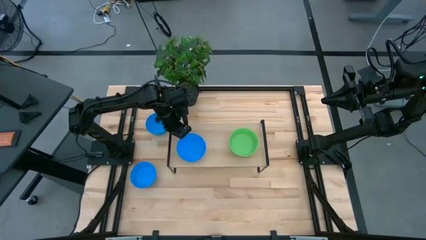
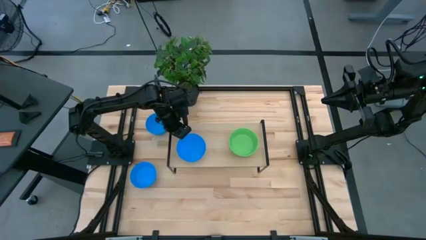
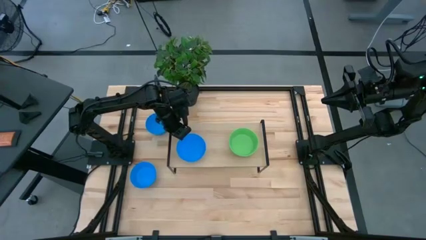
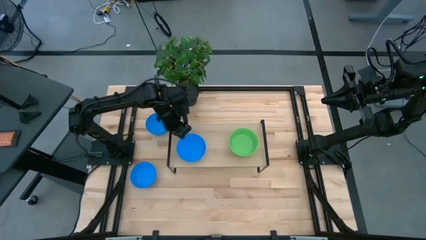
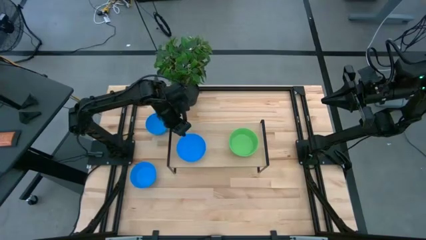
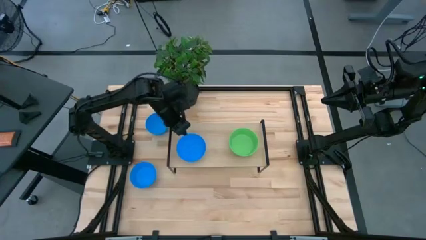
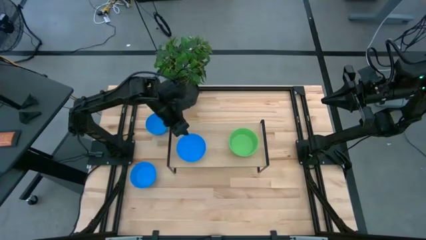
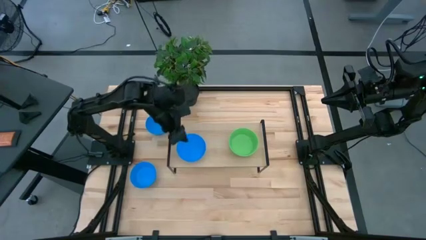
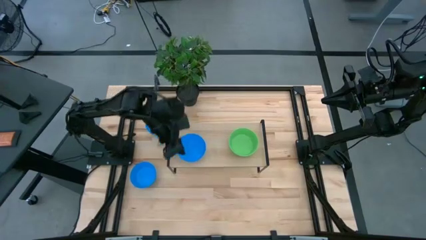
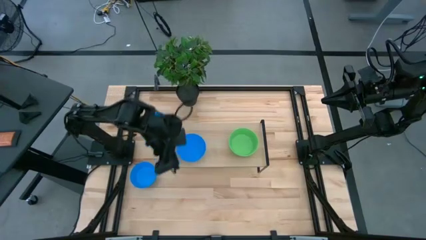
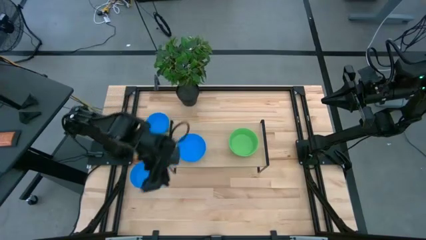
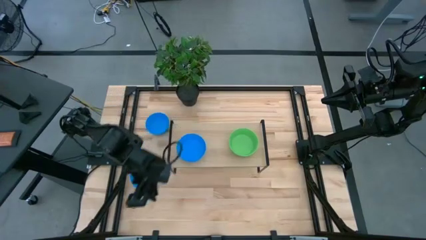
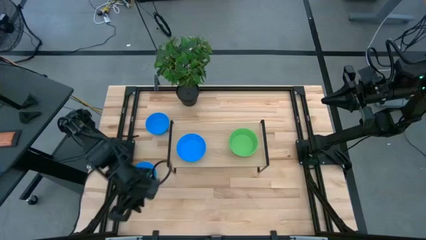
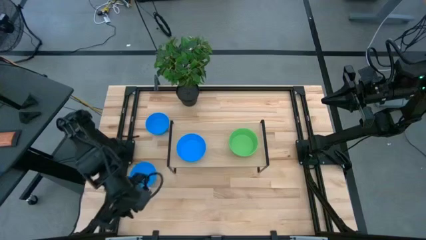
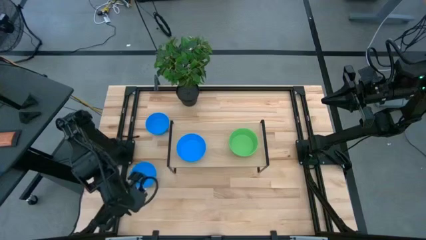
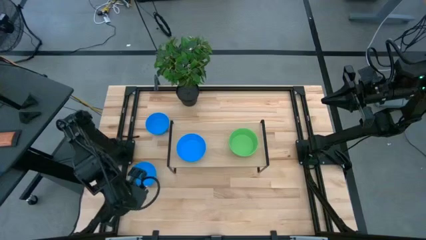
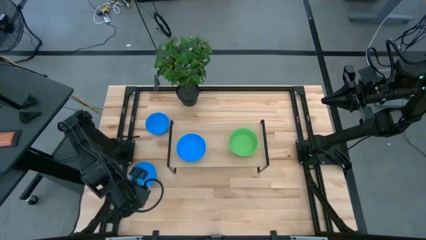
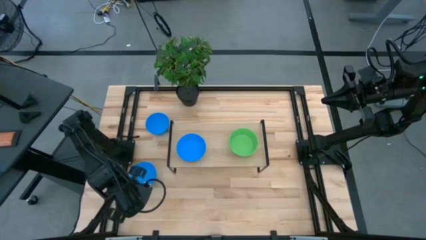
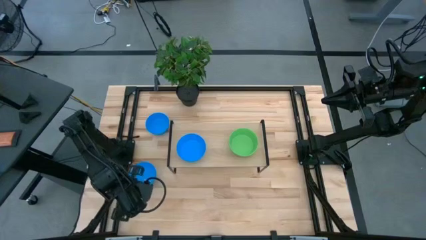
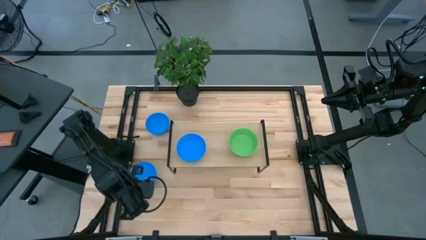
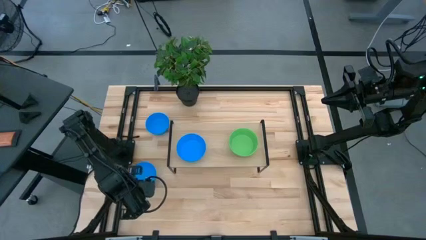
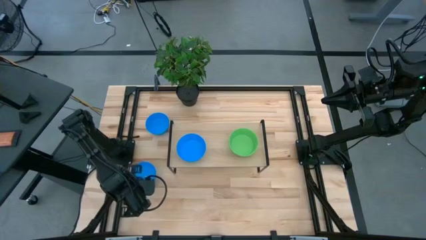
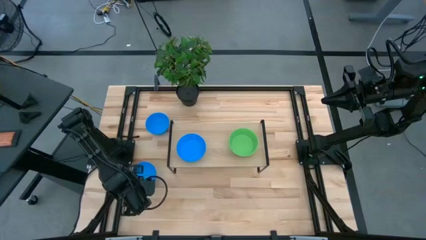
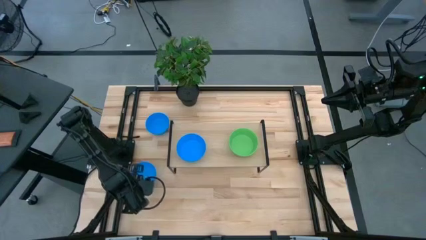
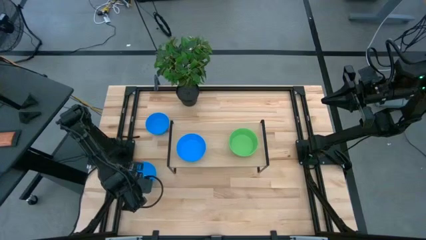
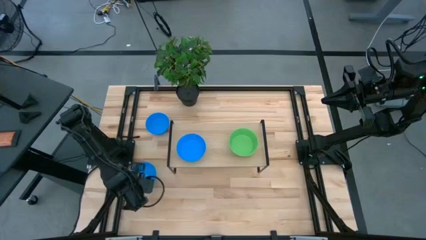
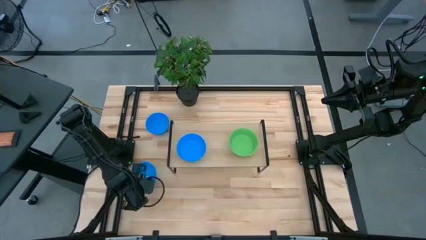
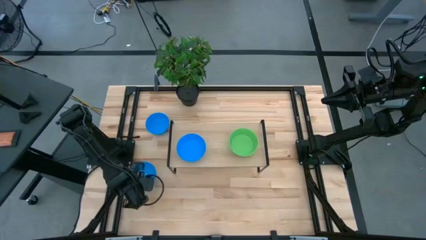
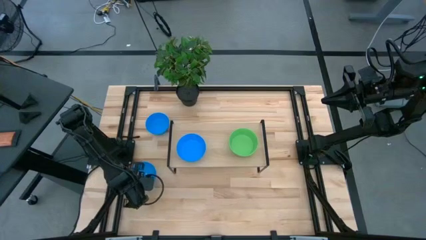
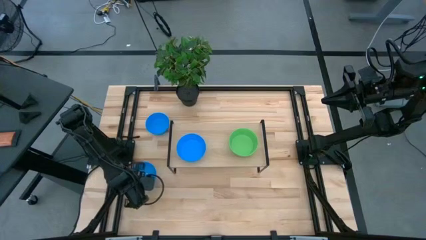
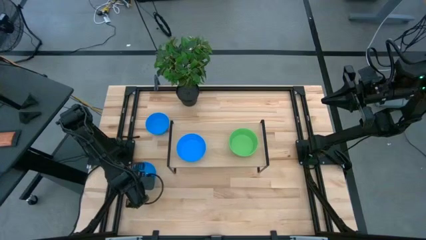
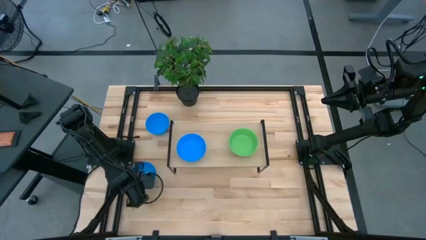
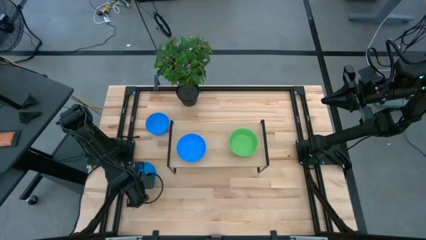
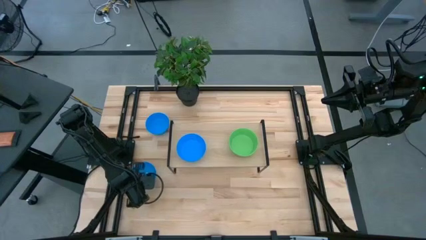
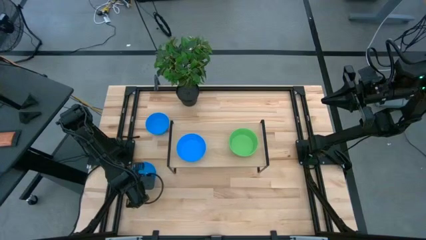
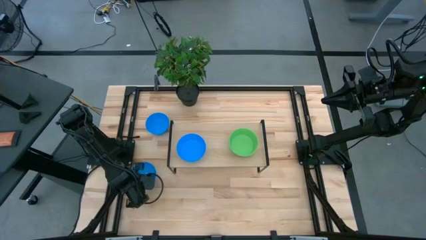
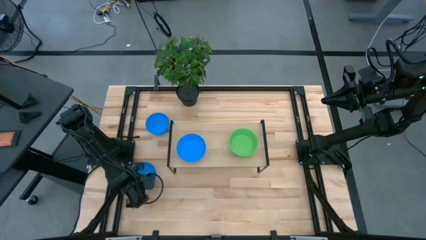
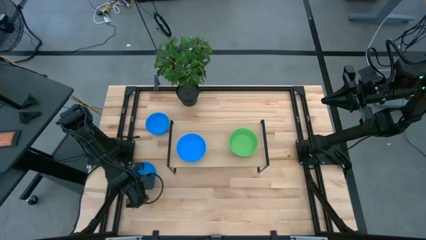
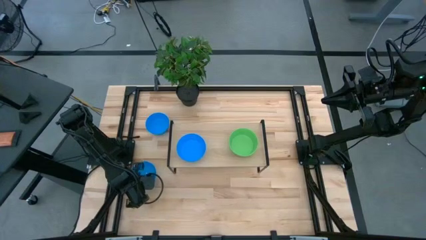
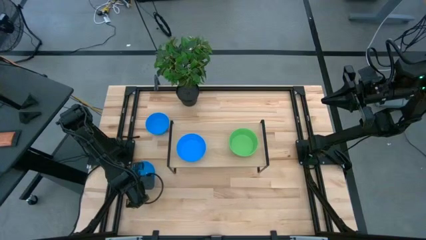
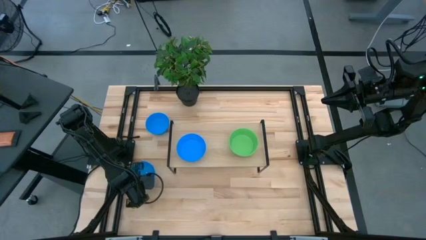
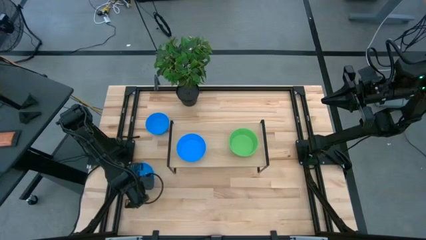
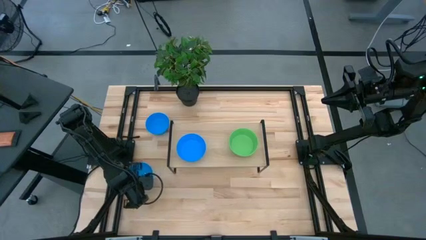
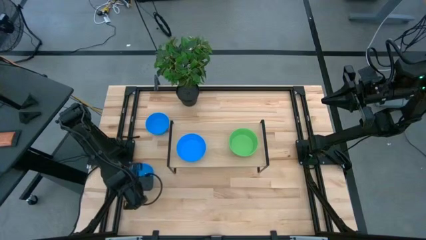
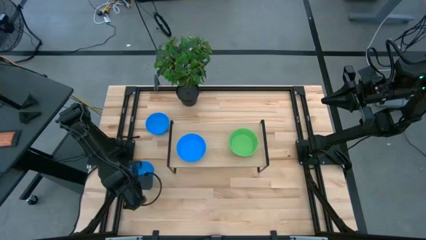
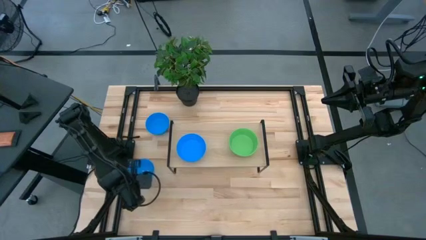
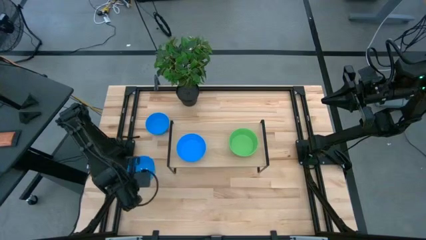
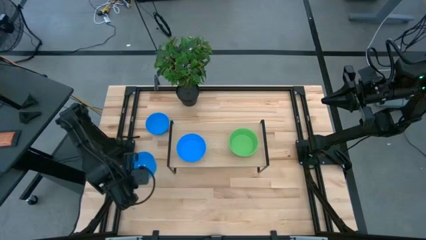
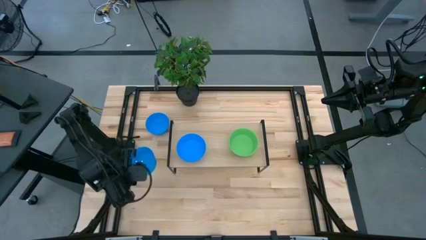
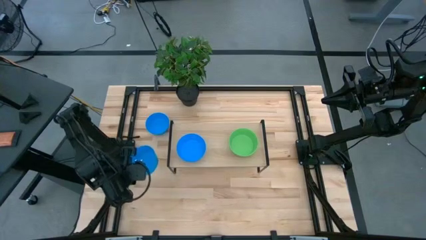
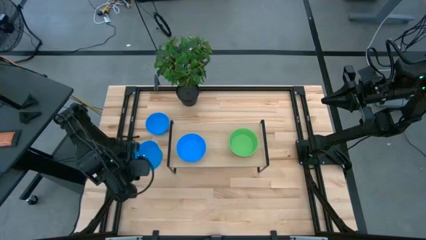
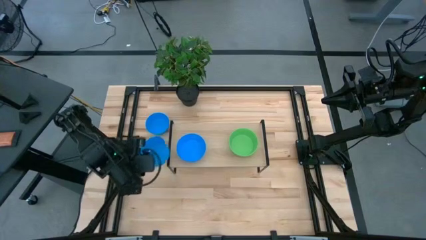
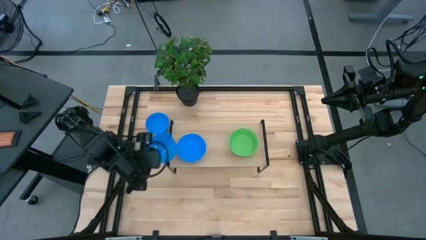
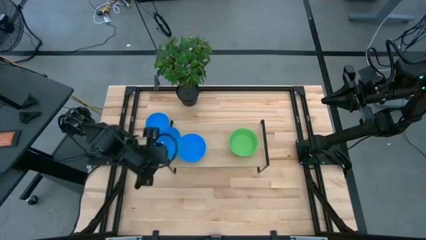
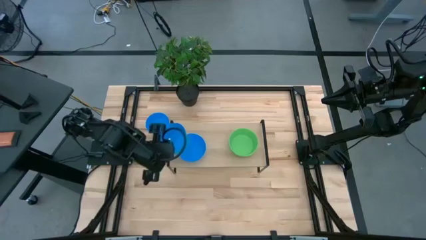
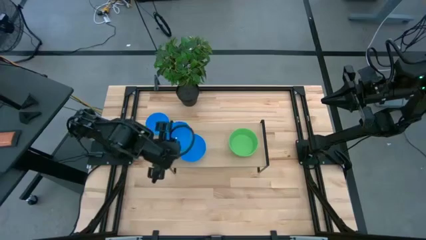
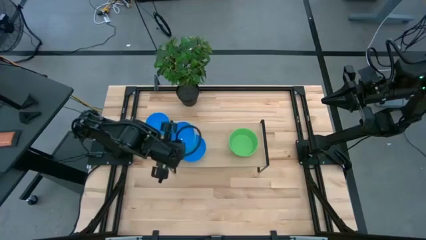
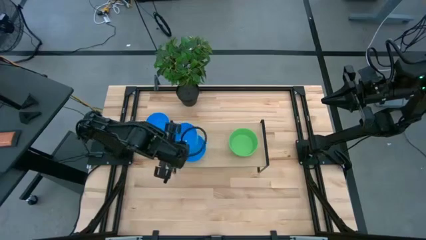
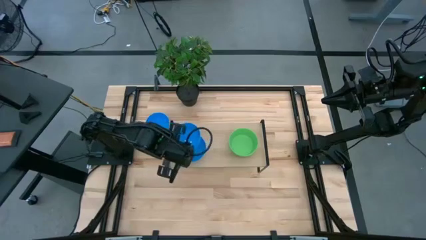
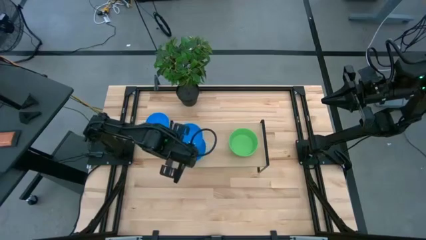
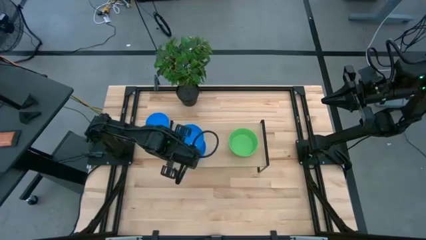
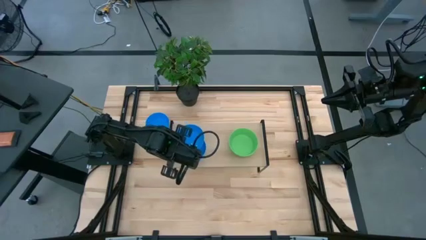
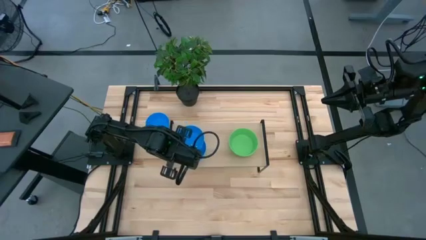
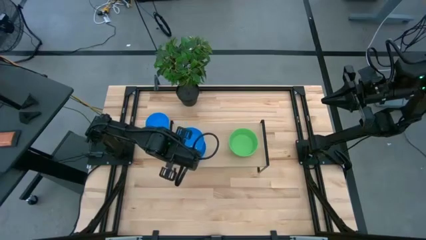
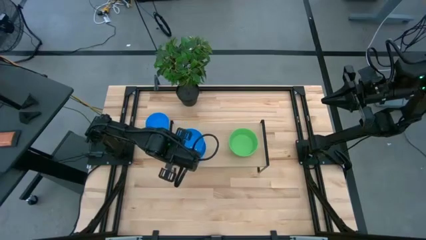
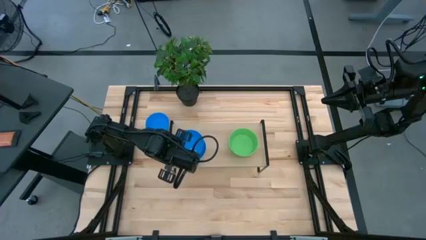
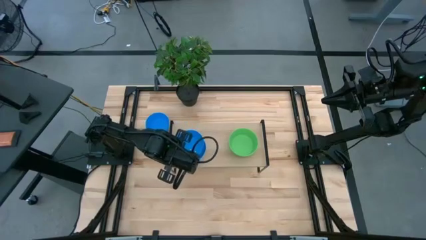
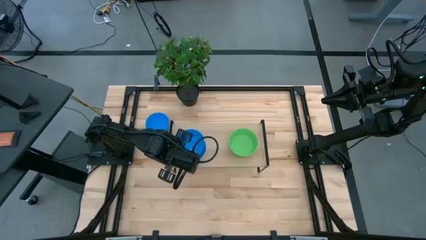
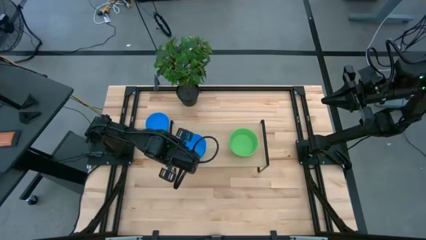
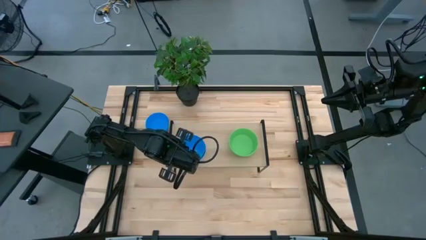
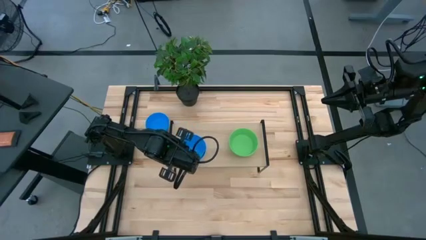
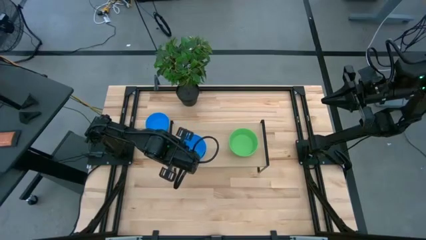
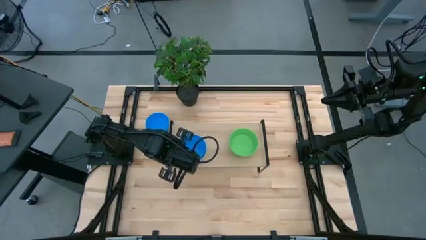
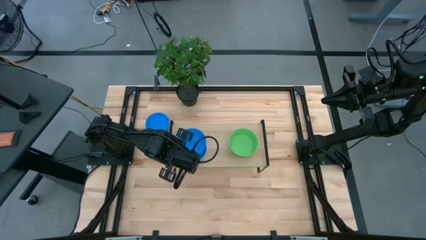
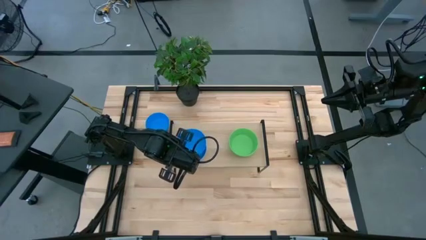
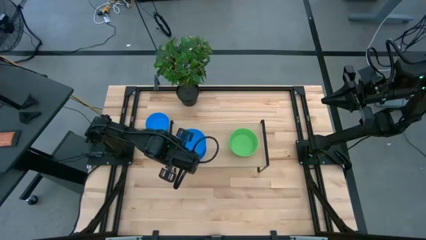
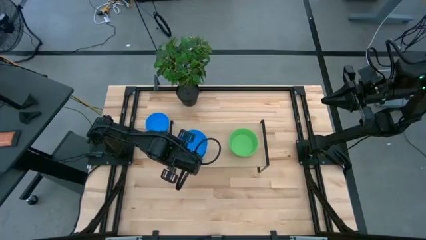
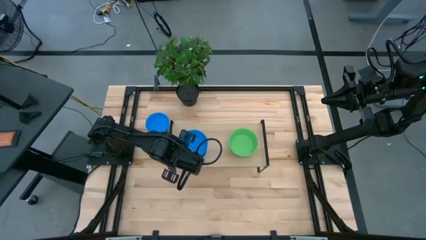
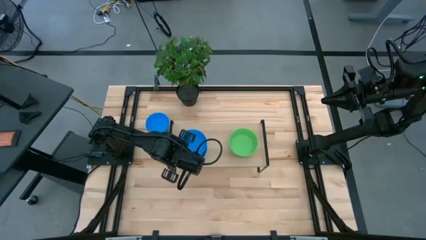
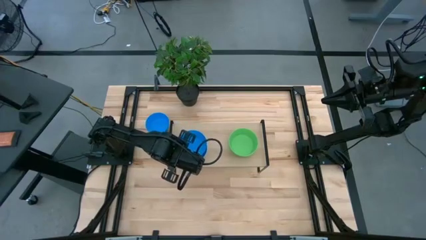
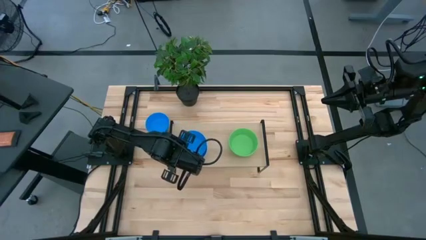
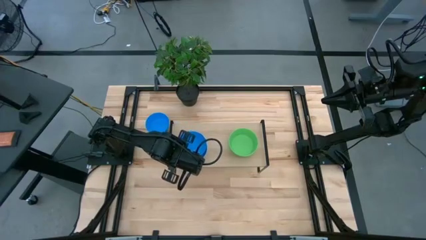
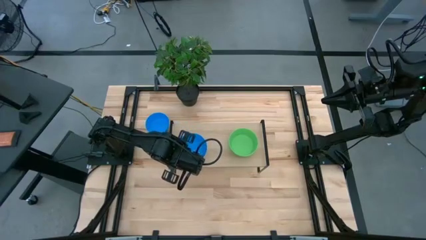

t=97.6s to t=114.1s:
Task: Pick & Place Mini bowls
Stack the bottom blue bowl on the blue bowl on the shelf
